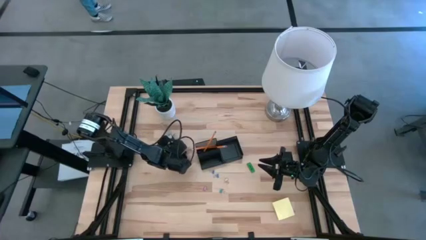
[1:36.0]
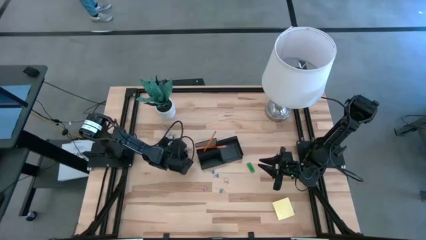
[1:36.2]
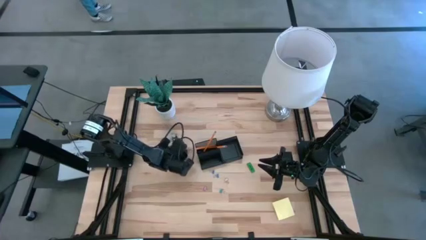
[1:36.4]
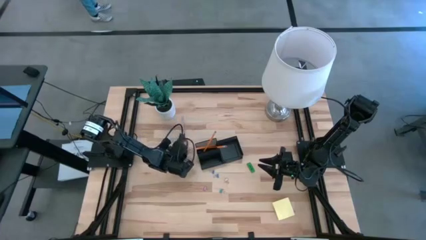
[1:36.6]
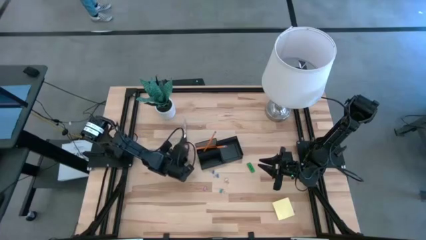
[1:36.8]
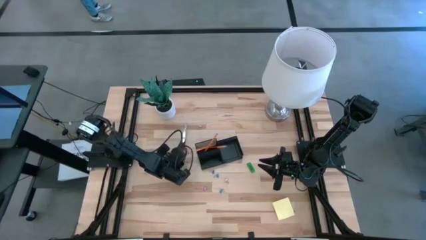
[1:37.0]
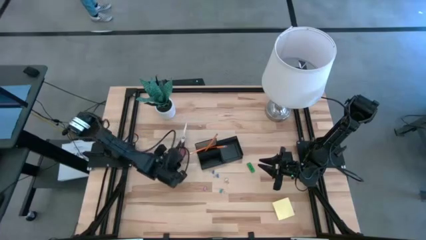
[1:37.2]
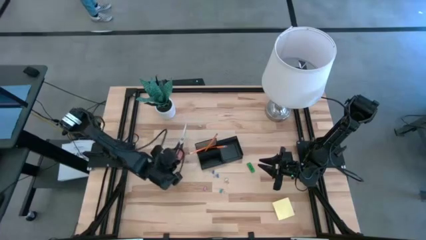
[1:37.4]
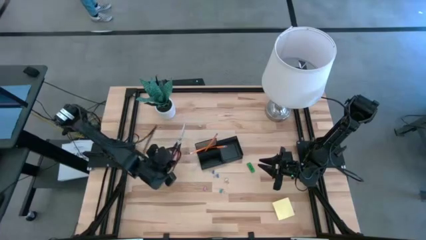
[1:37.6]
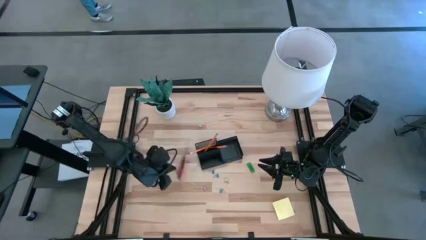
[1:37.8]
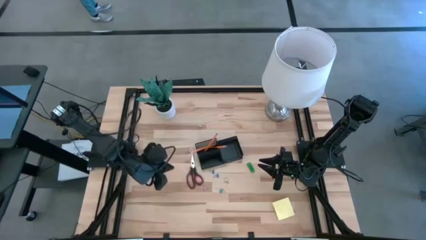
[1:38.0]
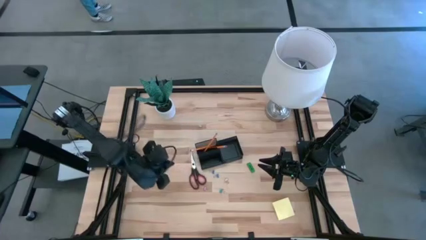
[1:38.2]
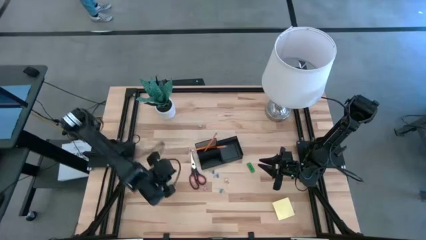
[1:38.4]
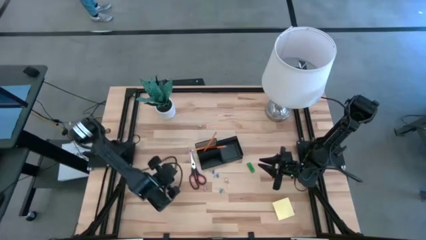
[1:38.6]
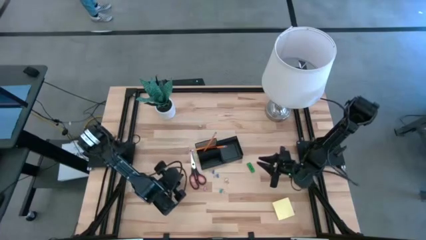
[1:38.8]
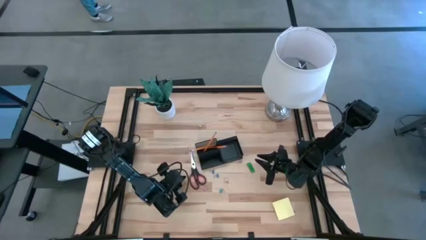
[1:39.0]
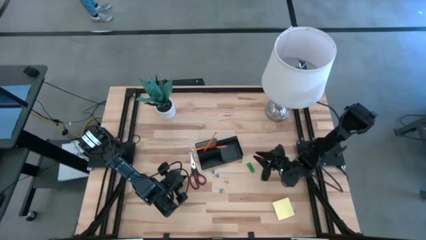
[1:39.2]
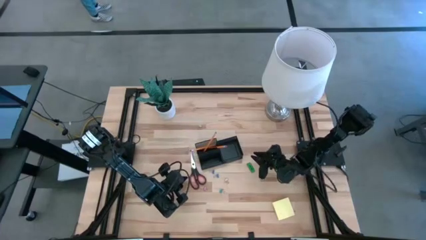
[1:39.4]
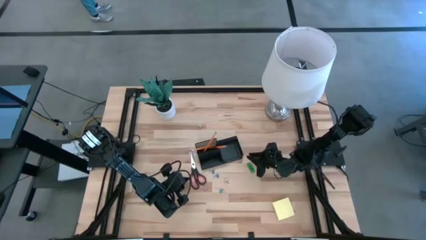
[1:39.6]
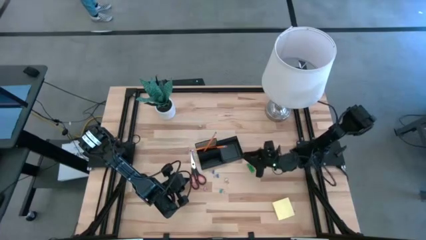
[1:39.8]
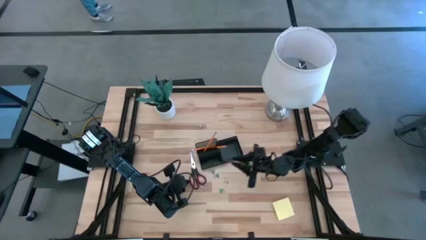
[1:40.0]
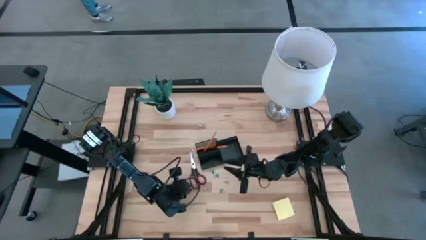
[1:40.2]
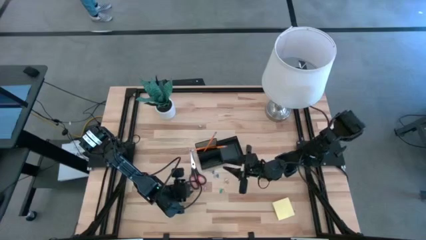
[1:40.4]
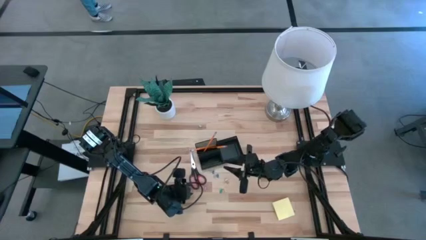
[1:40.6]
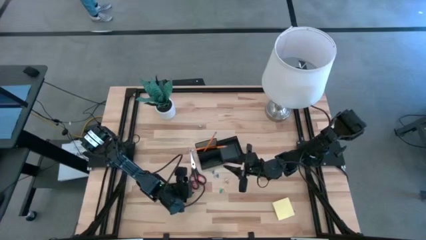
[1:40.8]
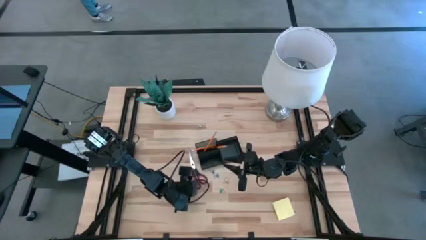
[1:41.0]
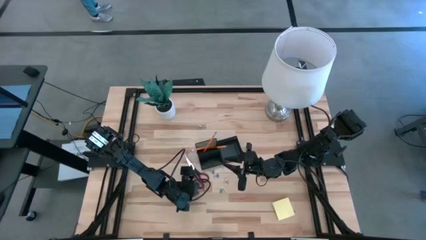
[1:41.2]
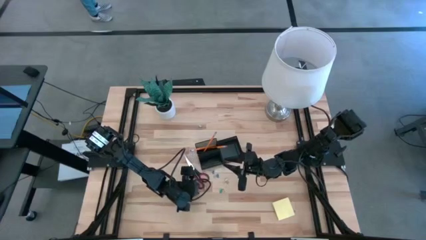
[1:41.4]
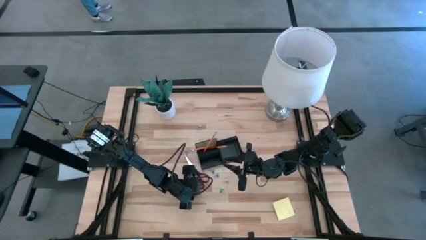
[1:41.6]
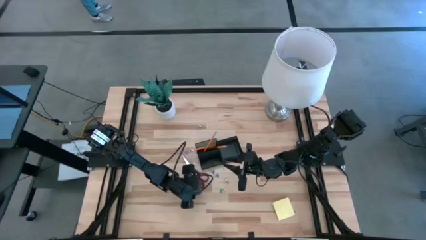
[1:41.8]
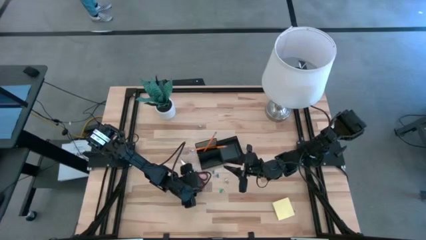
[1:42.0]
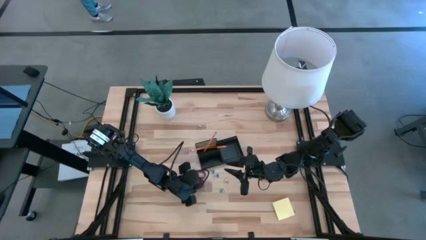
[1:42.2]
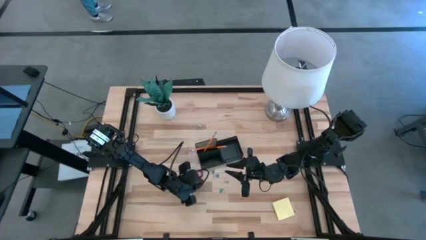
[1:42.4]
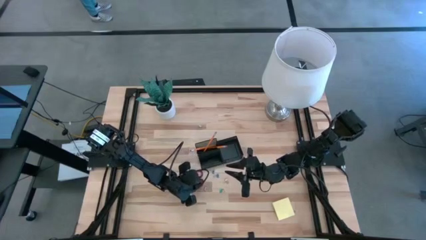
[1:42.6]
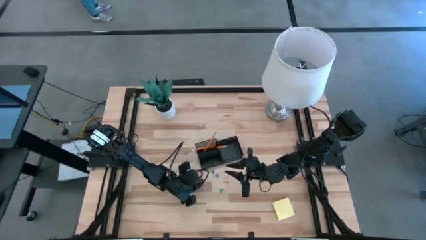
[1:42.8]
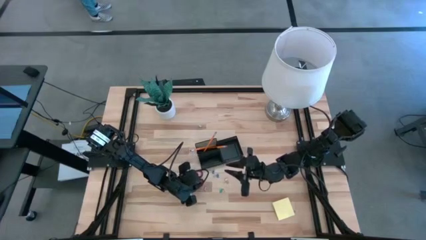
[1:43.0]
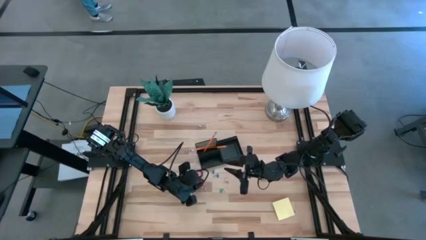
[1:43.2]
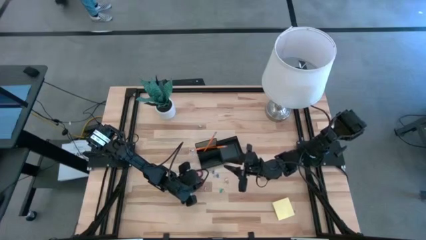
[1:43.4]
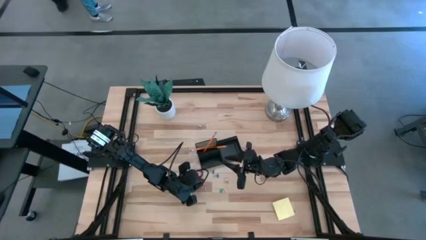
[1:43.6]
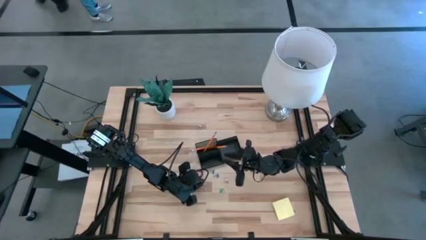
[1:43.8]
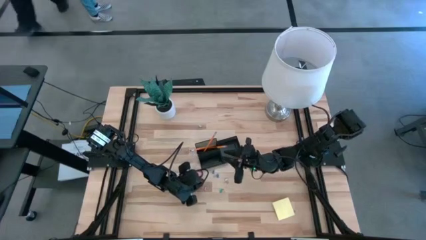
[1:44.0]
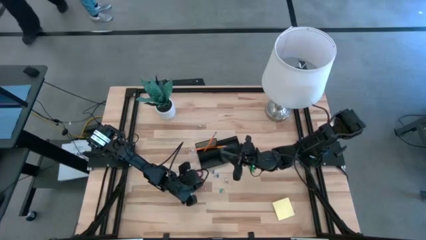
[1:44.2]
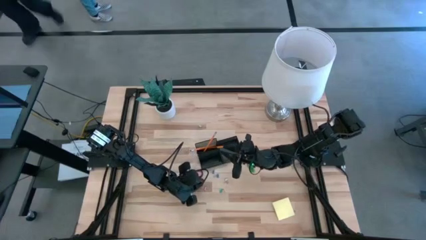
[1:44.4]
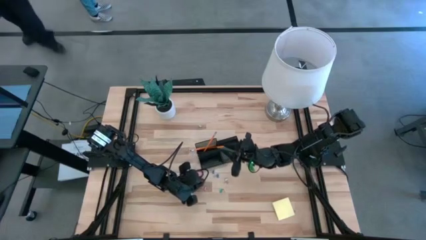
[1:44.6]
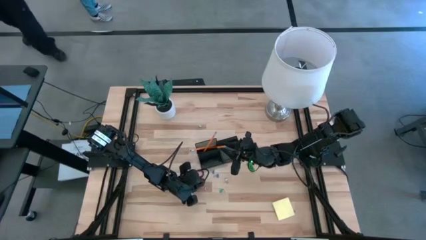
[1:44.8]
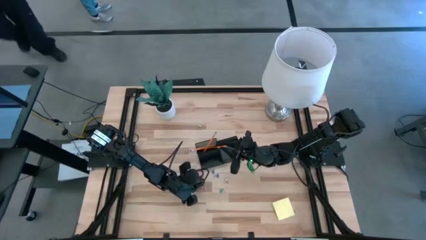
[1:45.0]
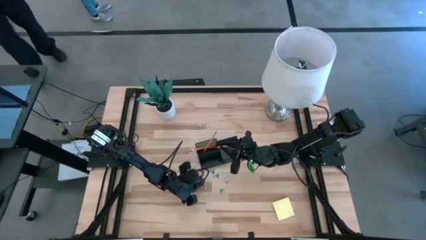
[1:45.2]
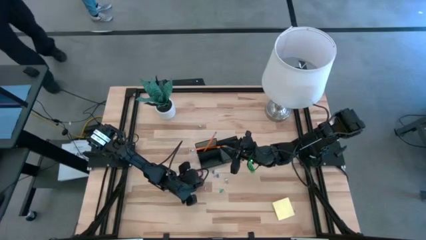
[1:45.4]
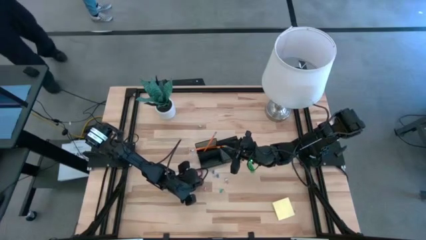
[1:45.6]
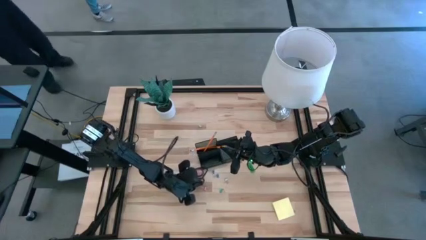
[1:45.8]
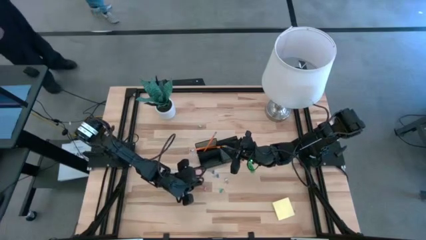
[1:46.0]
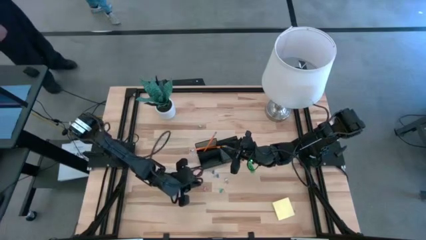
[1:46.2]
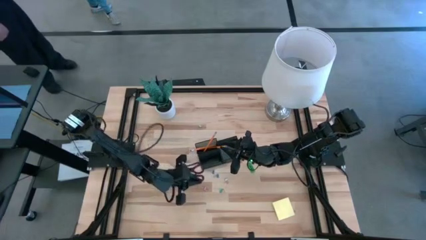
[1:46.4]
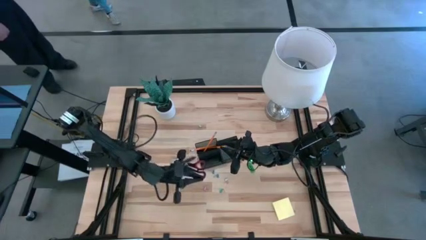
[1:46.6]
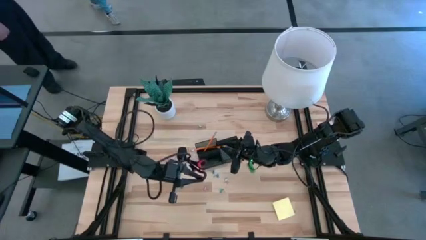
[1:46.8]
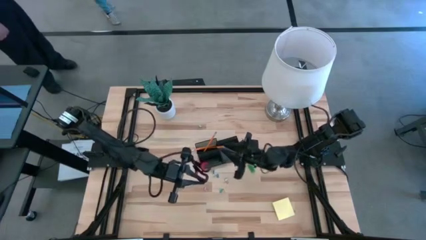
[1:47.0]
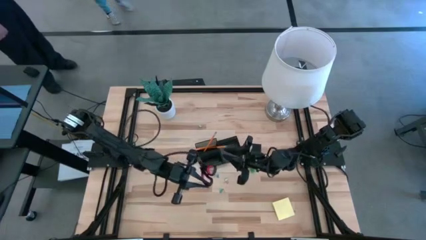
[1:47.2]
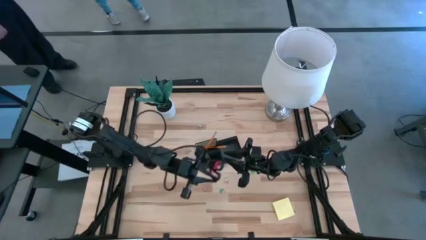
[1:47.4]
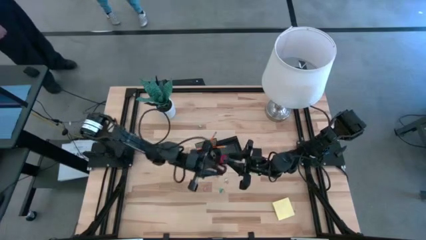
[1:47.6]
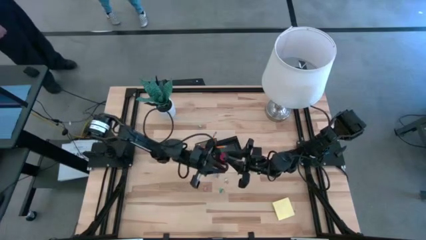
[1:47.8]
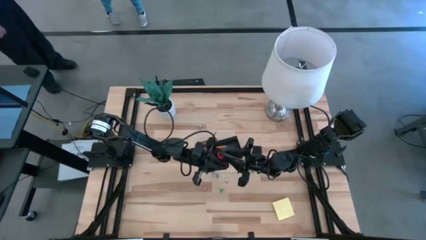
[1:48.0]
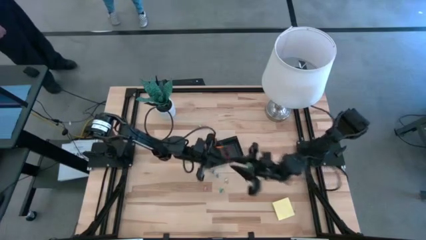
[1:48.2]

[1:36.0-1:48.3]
Task: Pick and place office supplies into organizer
Put the black scissors into the black desk organizer

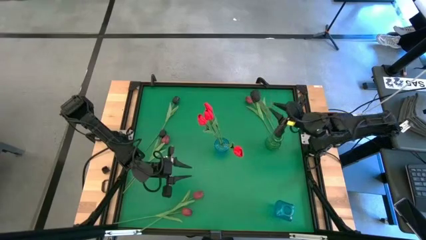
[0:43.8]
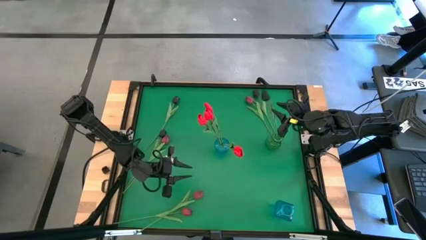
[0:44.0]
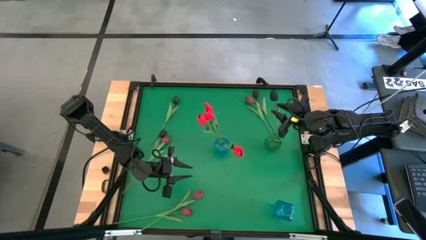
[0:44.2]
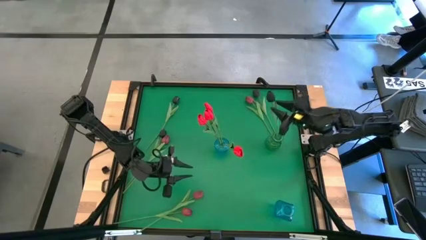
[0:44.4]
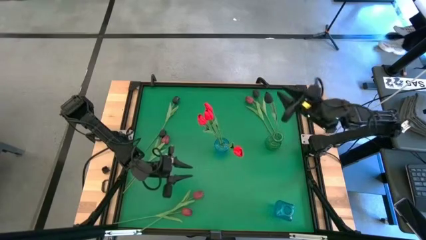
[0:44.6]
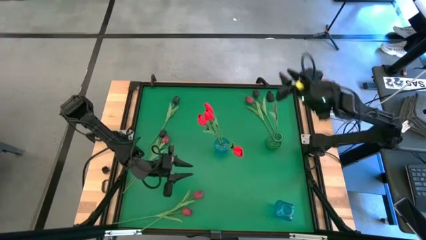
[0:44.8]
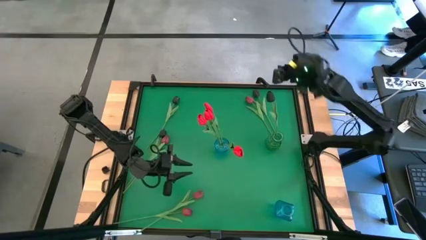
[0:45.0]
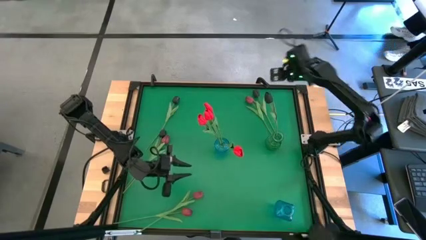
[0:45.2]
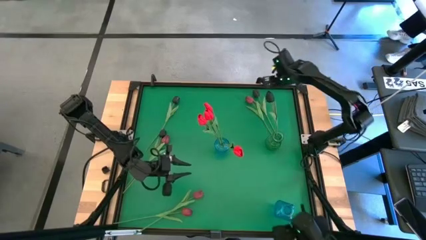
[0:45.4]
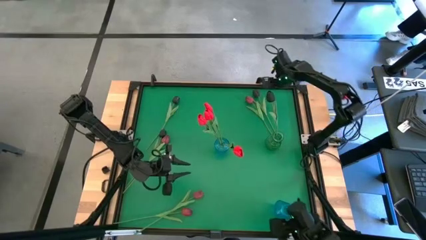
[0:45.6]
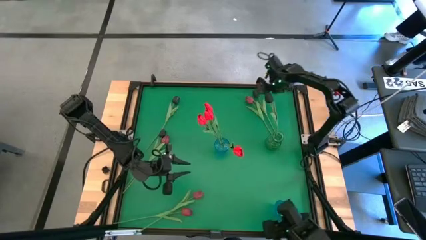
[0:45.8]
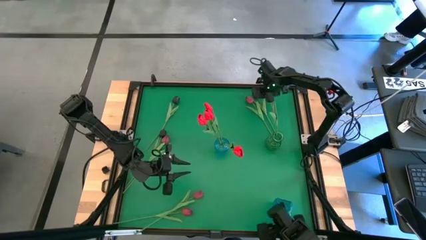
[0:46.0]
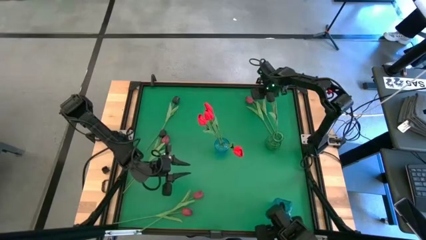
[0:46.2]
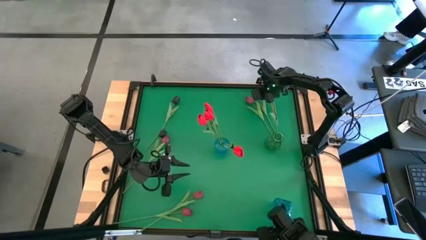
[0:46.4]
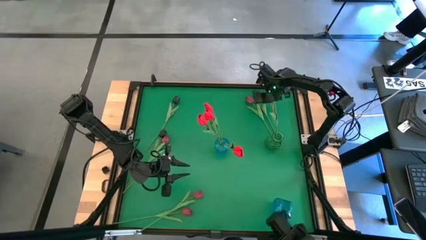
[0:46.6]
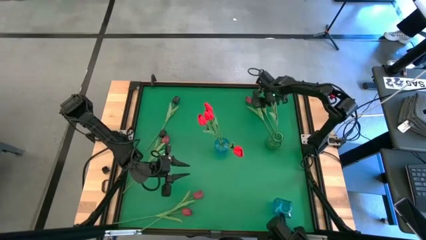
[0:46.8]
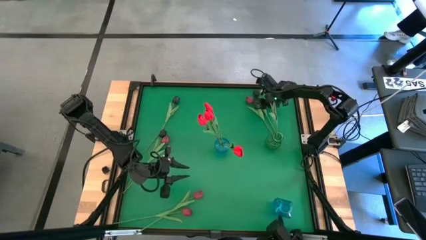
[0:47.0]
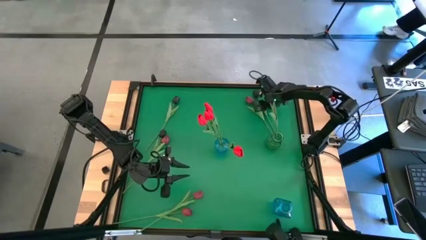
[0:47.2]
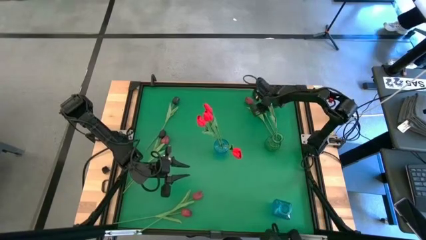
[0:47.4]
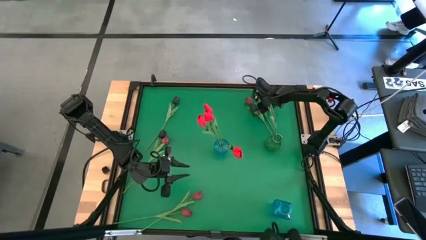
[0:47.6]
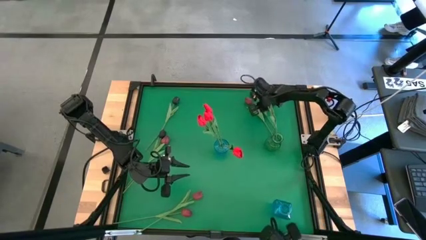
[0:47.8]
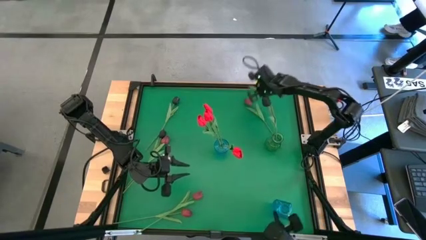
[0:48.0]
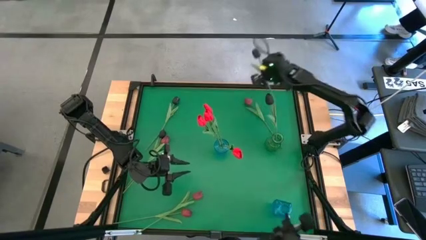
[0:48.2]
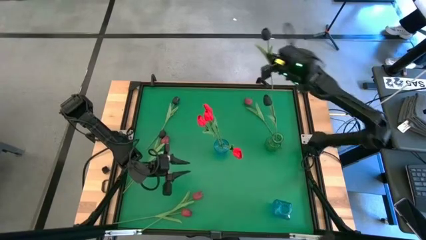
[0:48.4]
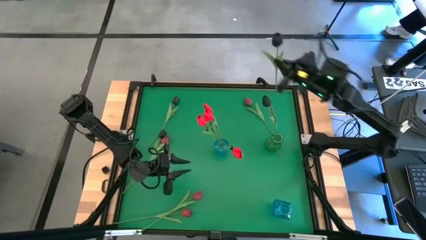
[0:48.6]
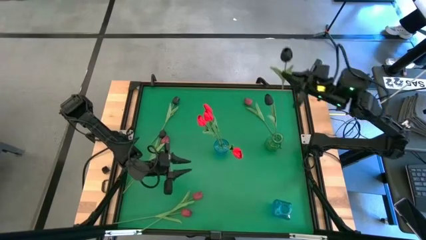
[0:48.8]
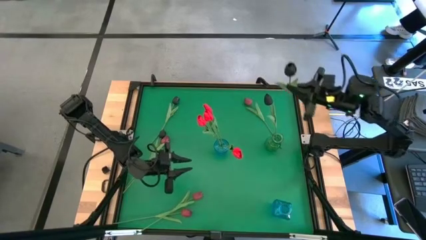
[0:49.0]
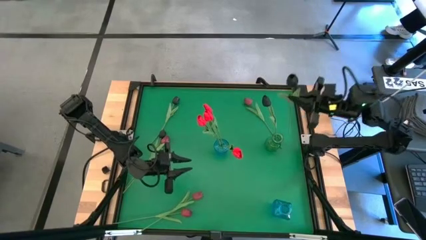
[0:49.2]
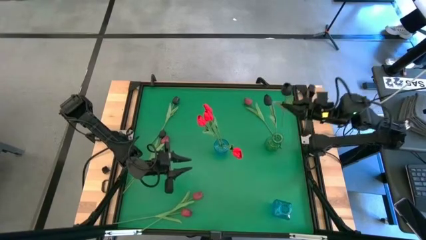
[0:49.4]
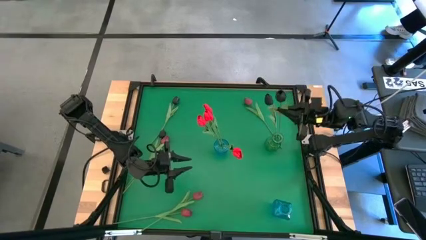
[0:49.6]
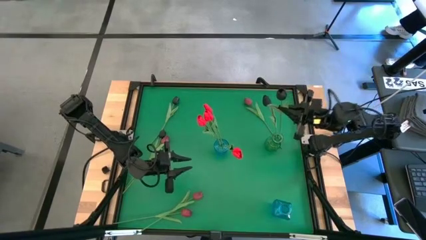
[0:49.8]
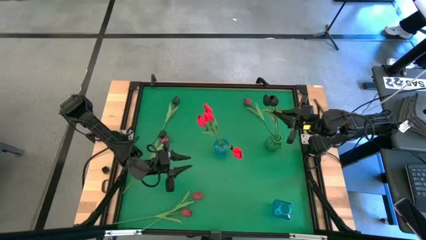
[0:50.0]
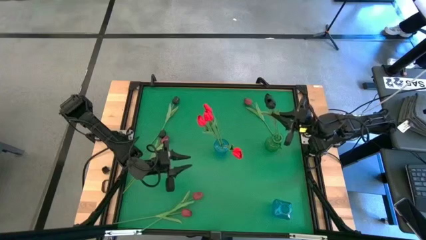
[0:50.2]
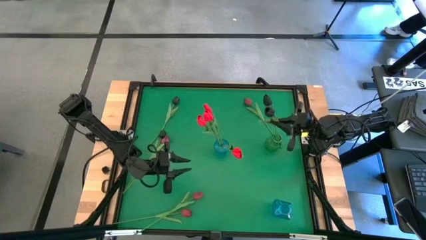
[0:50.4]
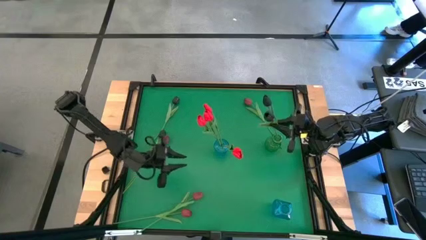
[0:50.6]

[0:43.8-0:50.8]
Task: Sort flowers into vase by color
Put the black flower in the green vase
